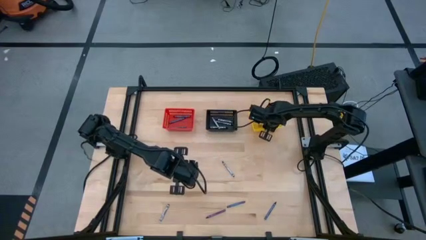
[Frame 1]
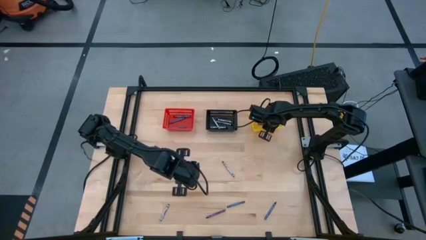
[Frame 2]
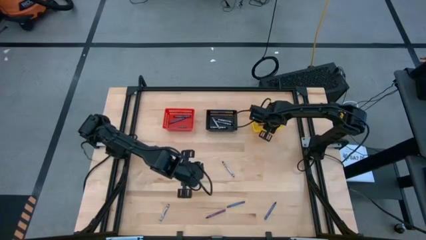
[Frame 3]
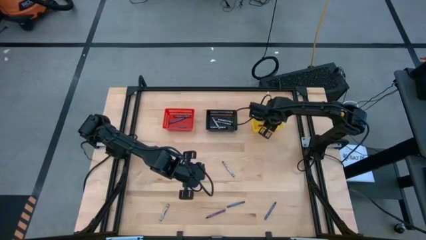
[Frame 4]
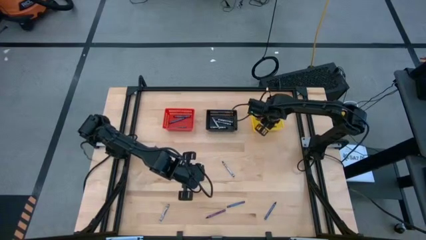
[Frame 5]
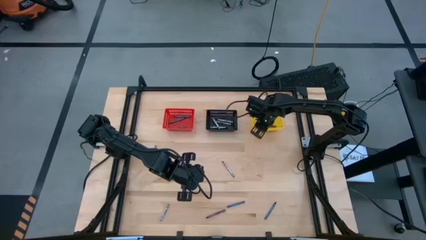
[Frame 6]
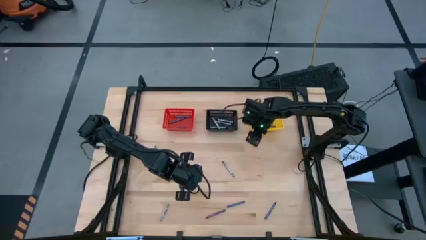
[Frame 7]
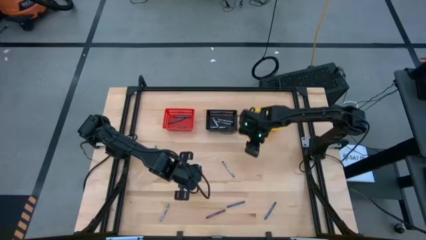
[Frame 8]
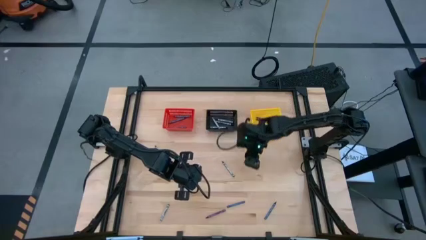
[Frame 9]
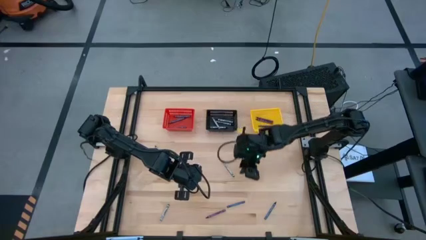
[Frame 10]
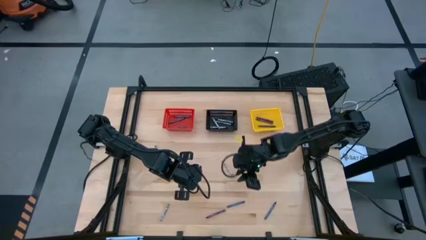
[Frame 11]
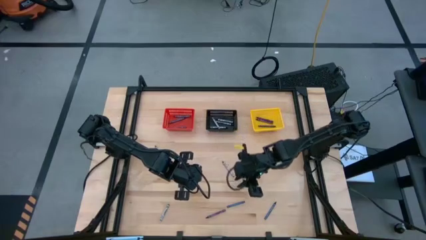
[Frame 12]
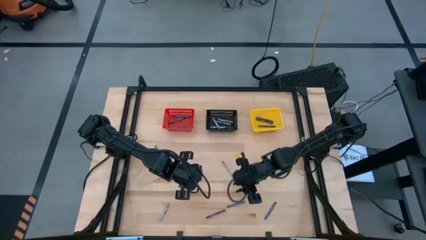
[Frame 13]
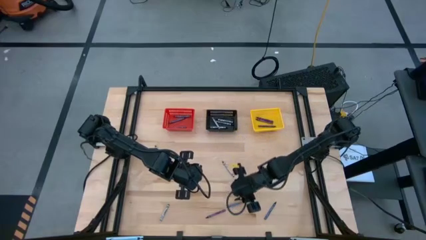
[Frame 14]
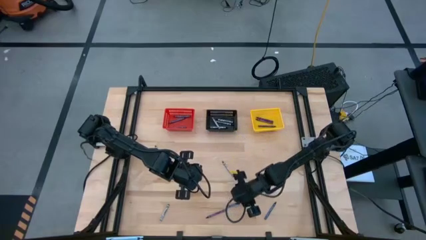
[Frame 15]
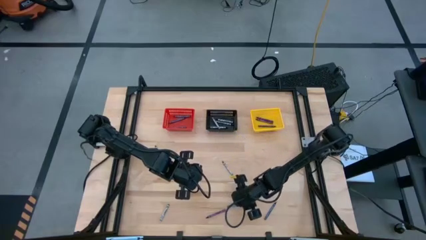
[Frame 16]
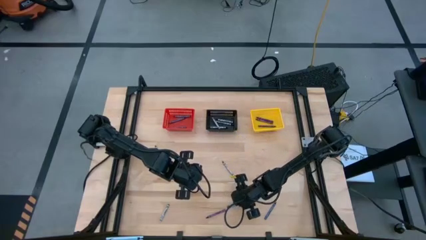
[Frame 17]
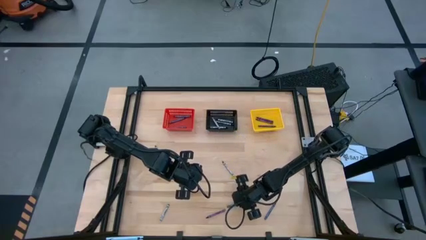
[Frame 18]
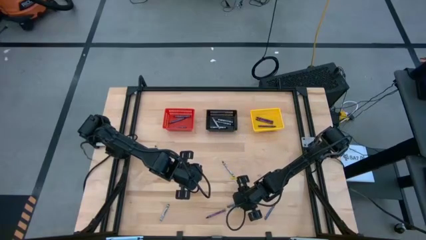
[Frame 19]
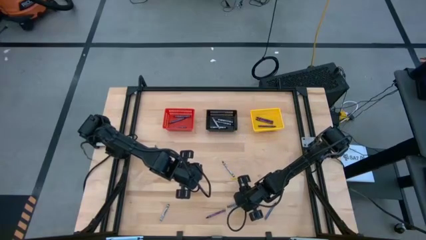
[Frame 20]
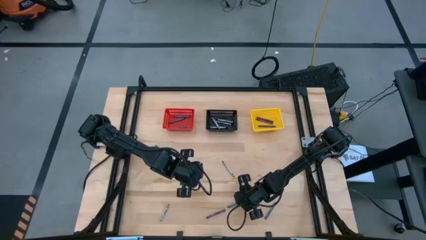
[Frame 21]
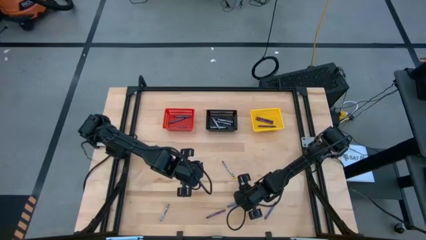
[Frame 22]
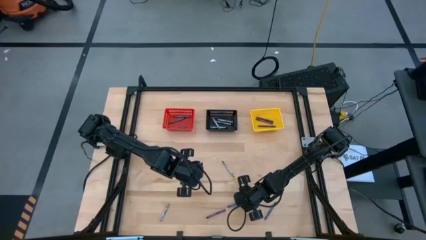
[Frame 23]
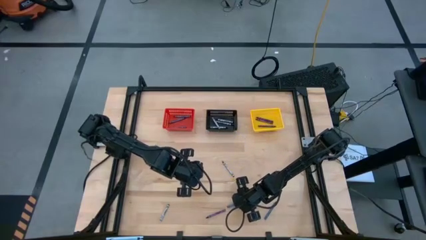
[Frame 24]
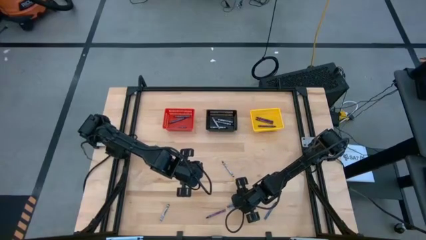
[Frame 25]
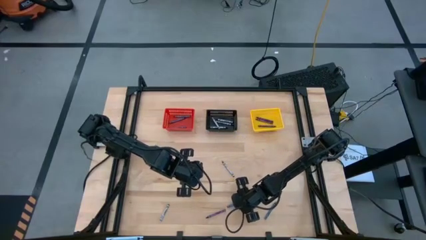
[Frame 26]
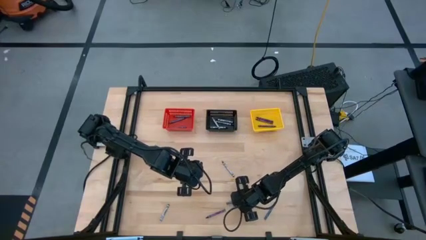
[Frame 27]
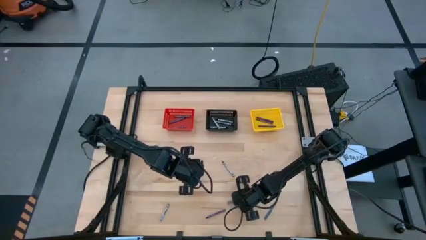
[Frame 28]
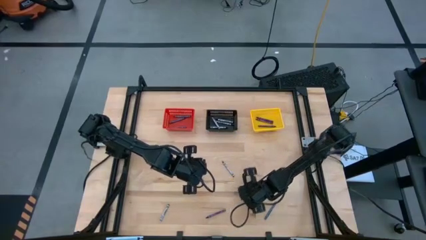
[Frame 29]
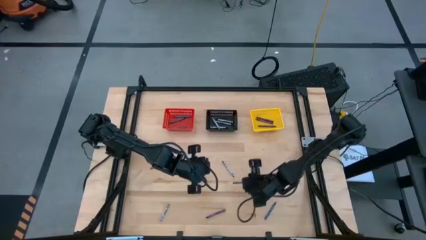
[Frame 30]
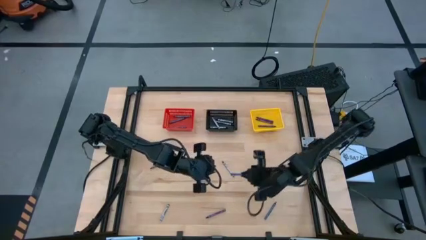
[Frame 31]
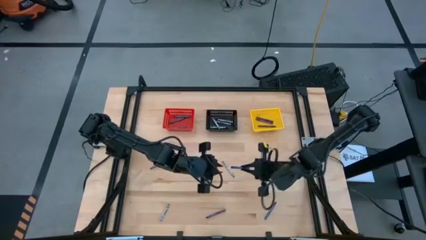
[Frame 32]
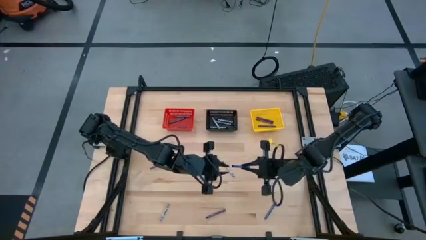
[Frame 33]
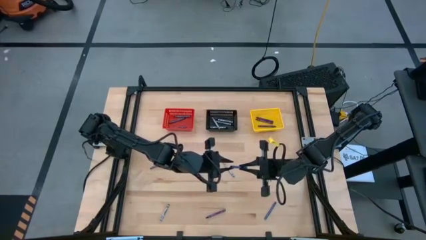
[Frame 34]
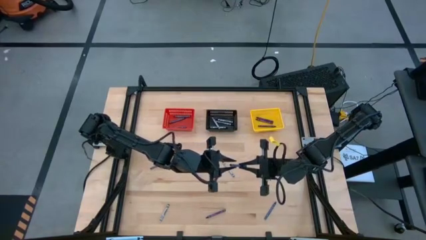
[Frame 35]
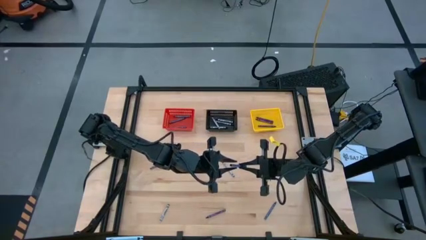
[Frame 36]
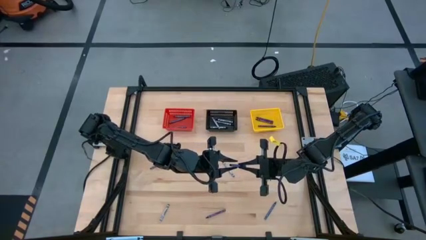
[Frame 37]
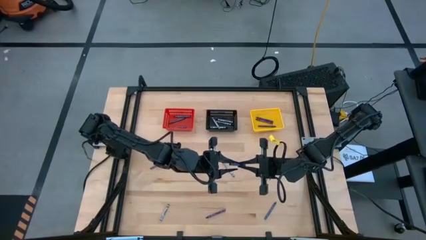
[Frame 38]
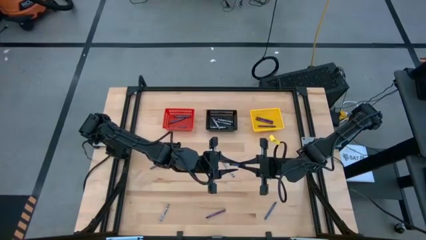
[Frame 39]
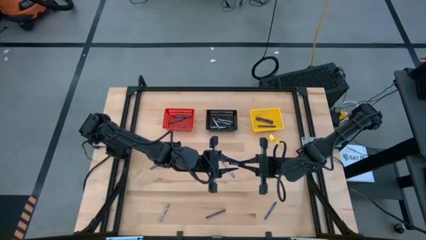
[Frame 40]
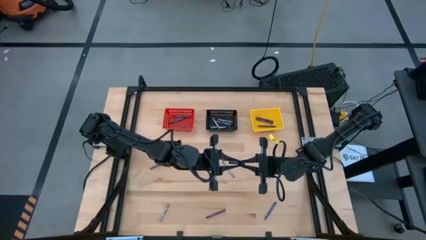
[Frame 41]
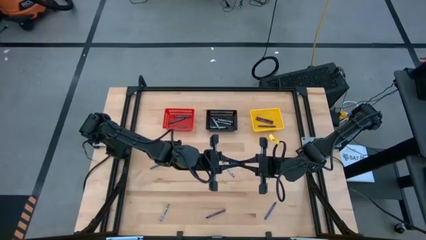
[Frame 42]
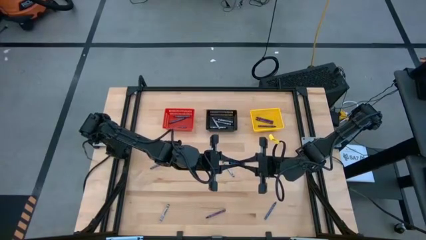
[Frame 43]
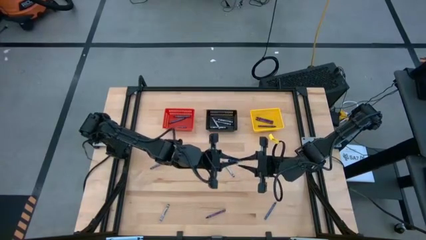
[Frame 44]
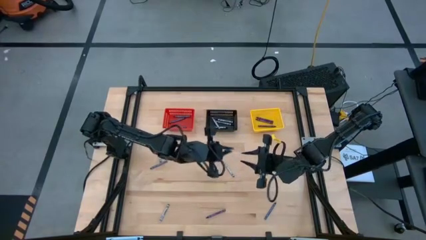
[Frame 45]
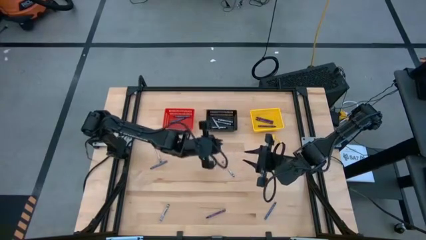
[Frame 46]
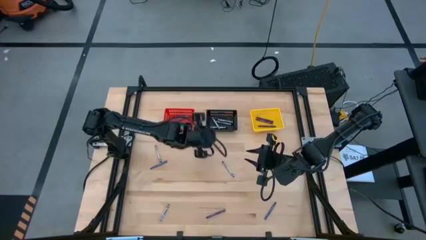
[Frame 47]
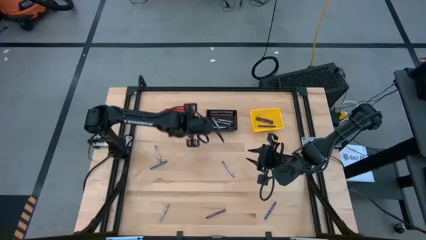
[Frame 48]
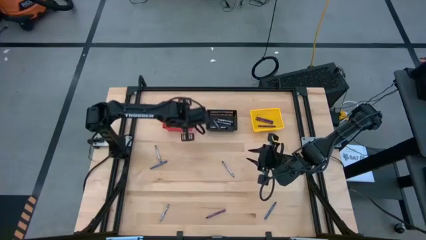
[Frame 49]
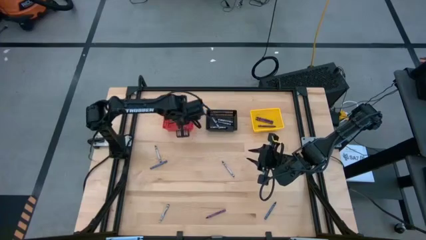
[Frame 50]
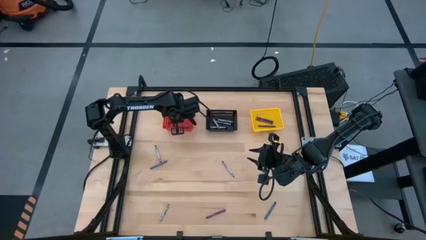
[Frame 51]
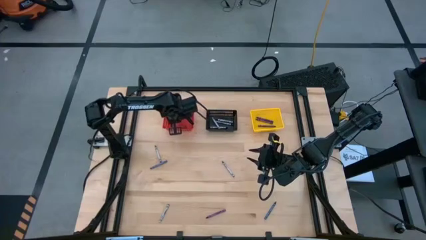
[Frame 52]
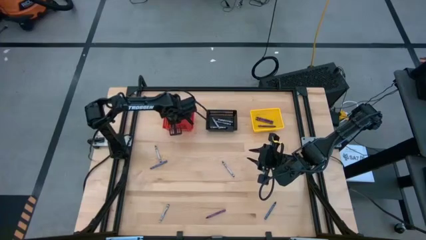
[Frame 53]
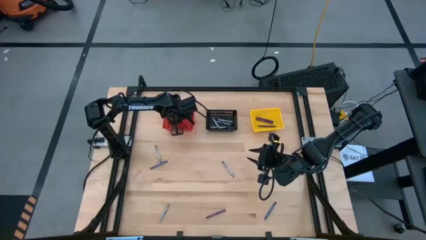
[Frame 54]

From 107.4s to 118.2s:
Task: Sort crayons
Put the blue crayon into the red basket

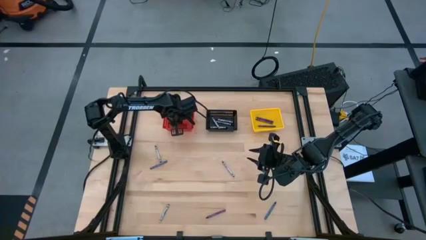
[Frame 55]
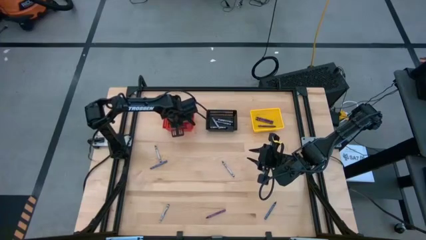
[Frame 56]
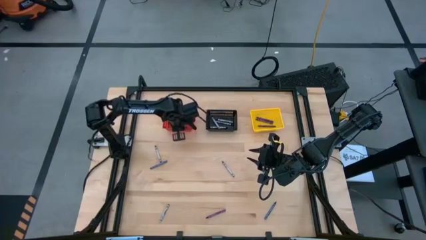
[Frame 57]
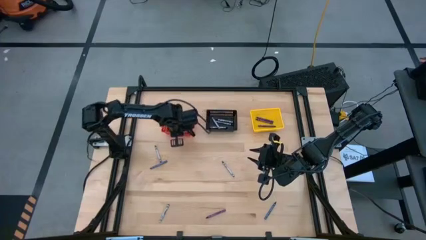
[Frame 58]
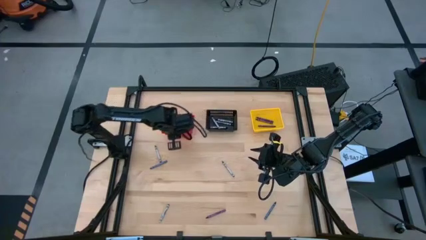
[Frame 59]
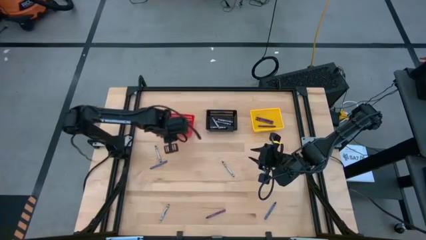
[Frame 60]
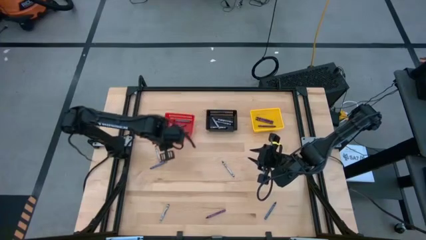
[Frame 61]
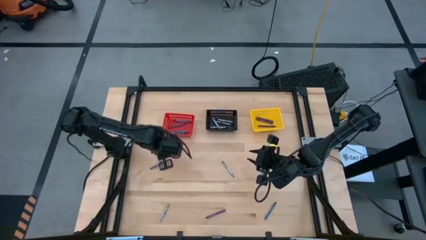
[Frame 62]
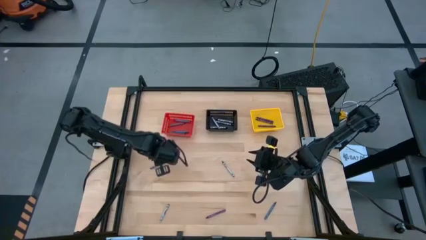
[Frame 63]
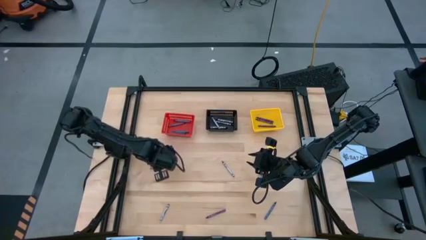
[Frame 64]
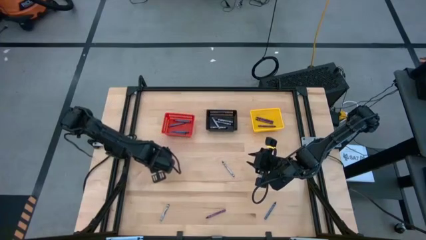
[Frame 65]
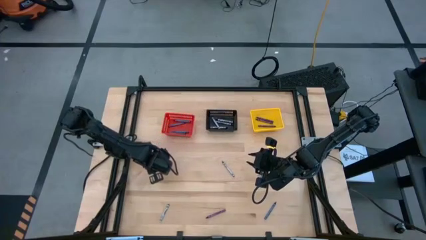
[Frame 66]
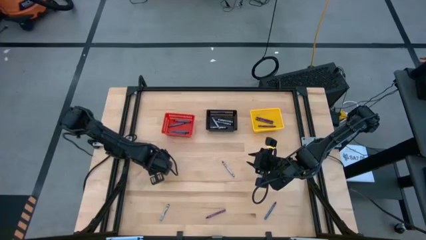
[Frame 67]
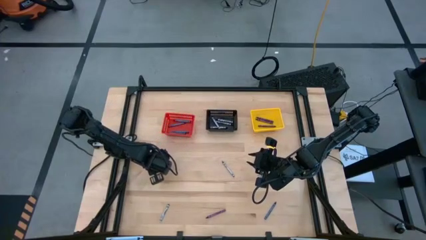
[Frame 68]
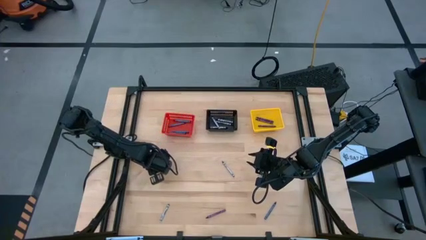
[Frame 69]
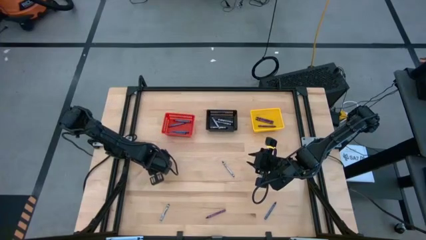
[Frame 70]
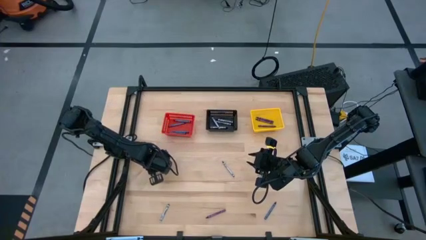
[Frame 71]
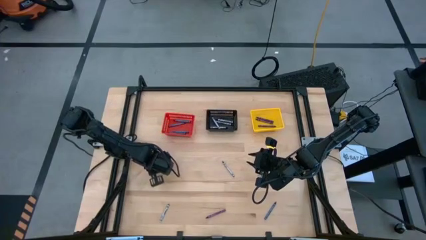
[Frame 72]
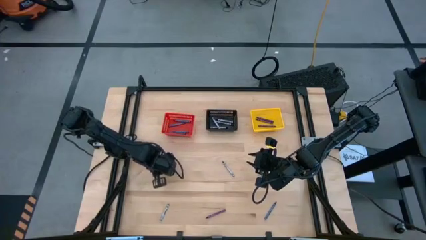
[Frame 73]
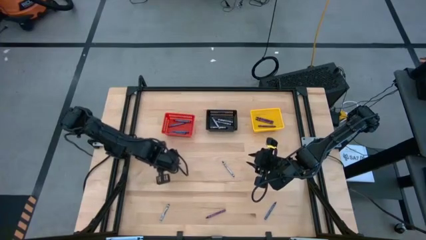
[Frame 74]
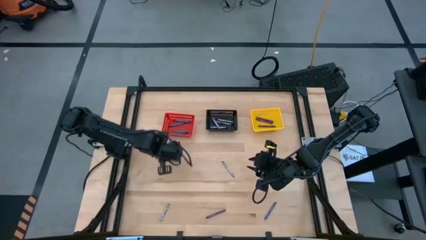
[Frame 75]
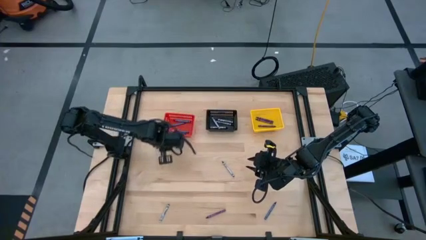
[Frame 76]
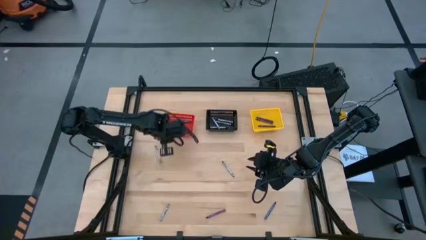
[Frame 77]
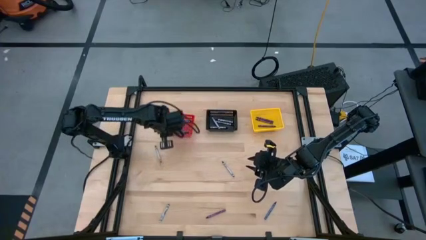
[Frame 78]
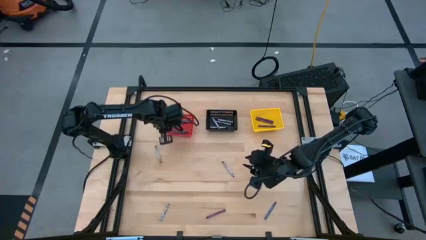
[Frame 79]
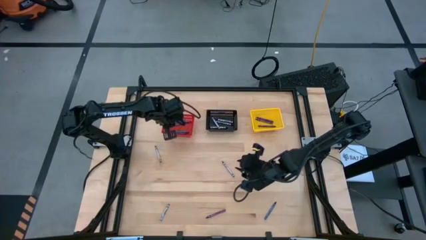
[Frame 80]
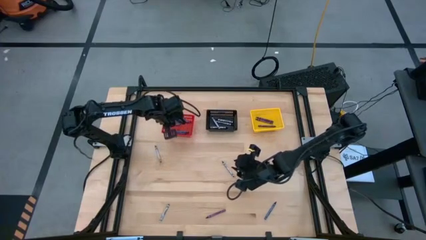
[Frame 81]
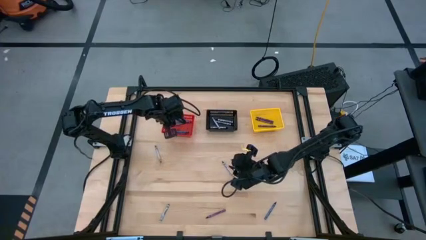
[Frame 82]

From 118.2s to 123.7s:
Put the blue crayon into the red basket
